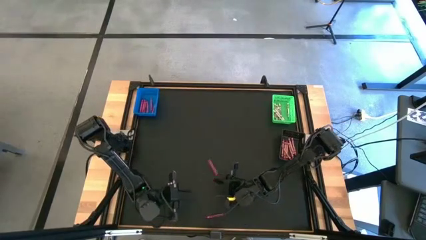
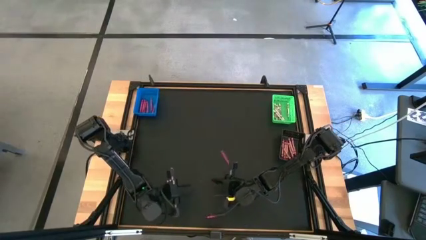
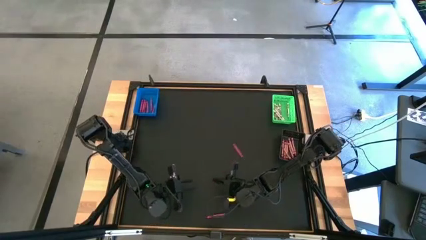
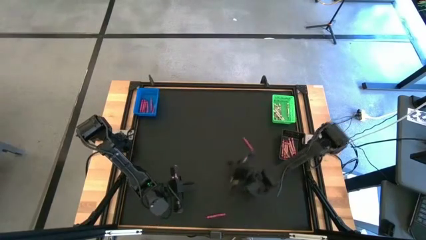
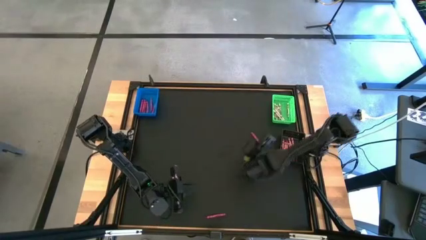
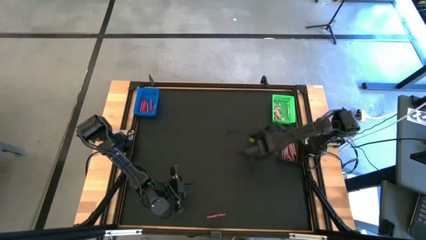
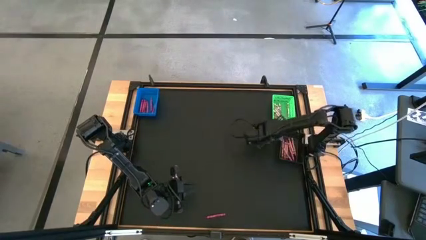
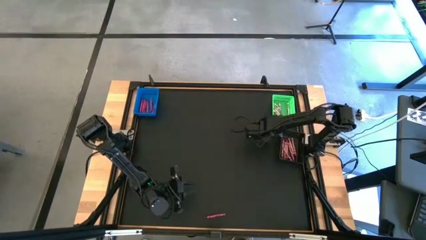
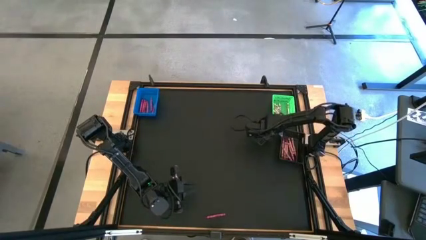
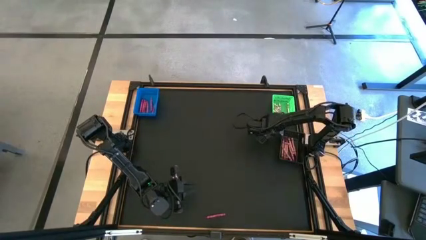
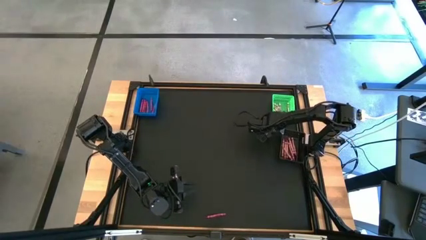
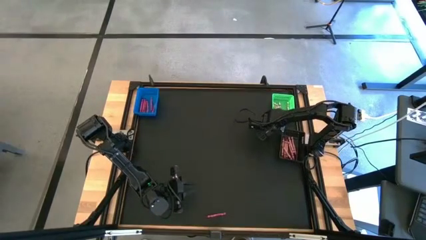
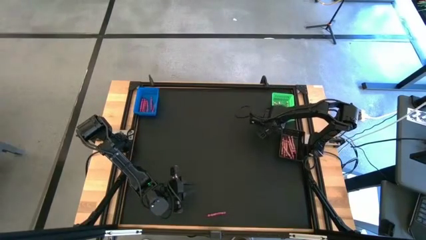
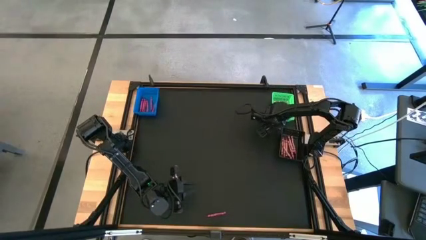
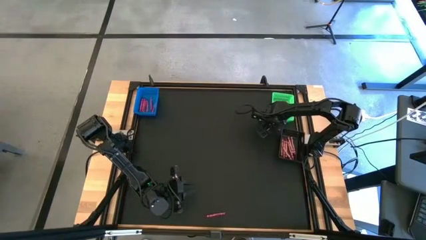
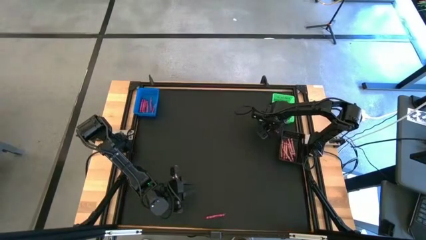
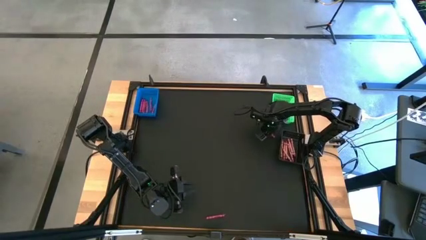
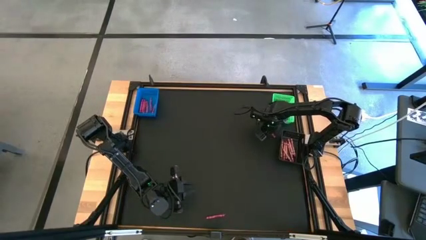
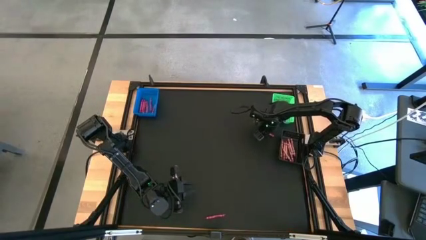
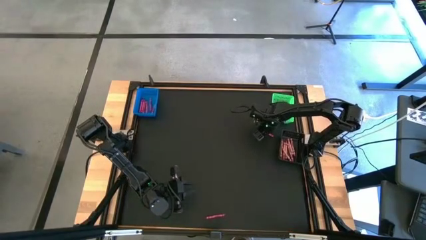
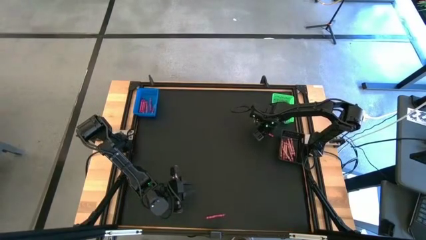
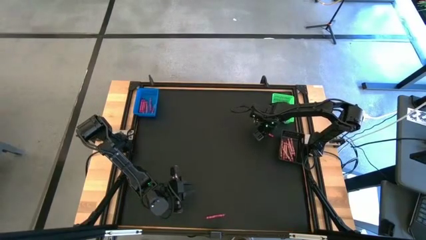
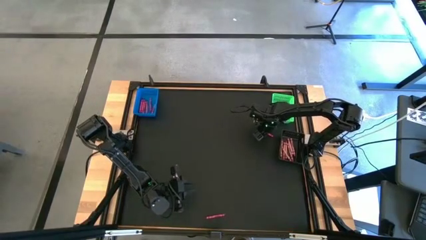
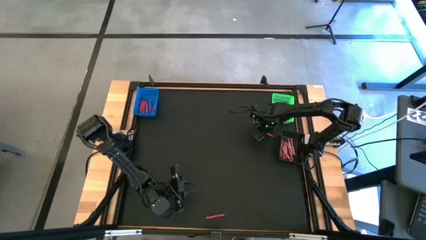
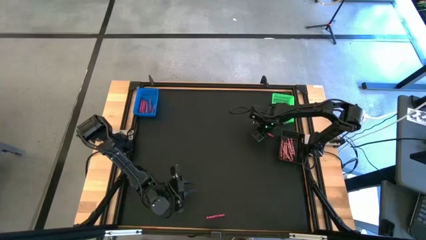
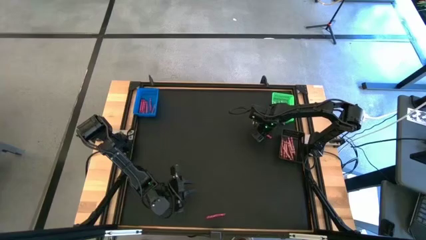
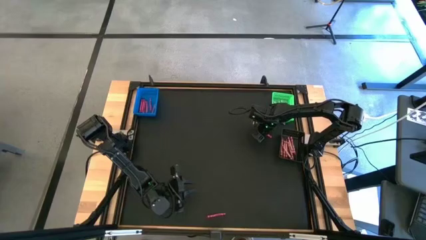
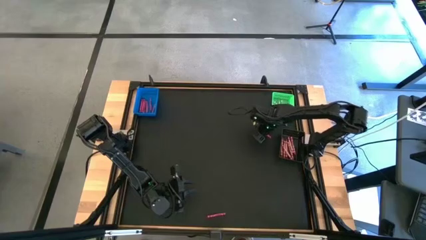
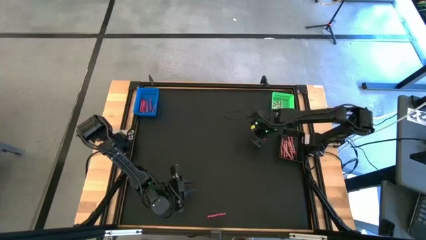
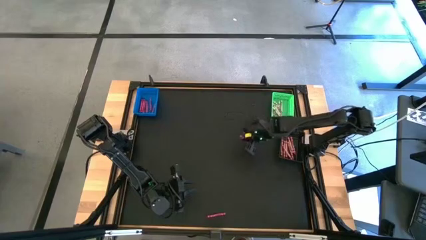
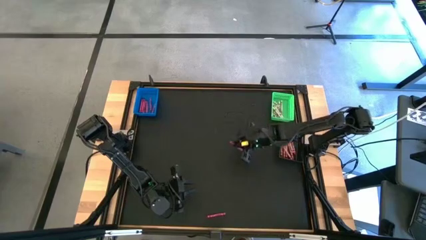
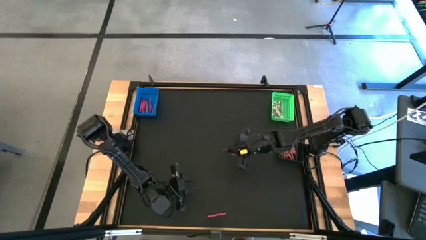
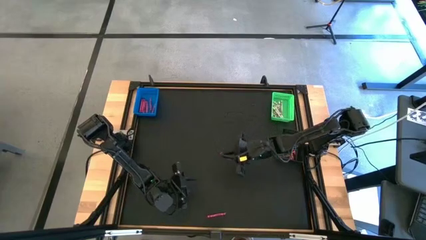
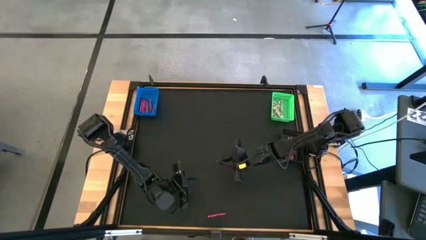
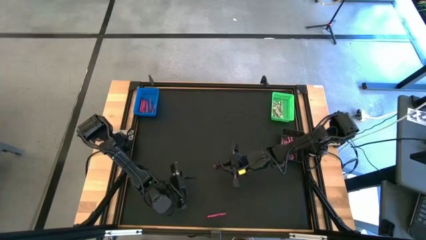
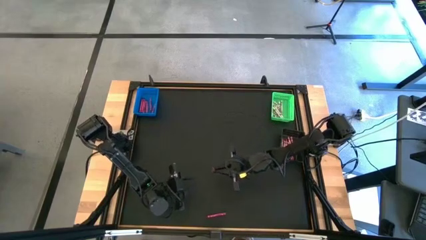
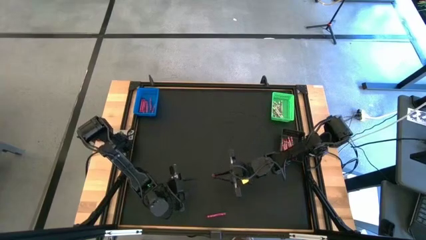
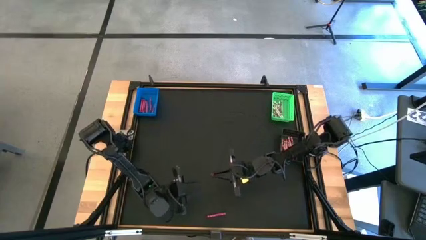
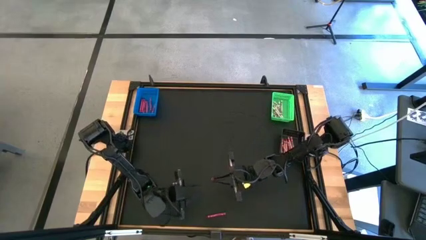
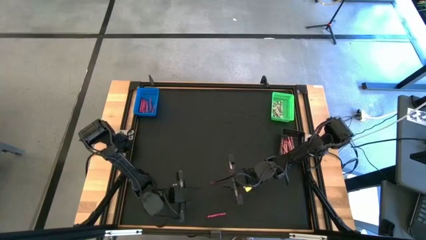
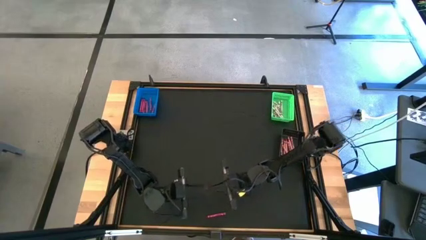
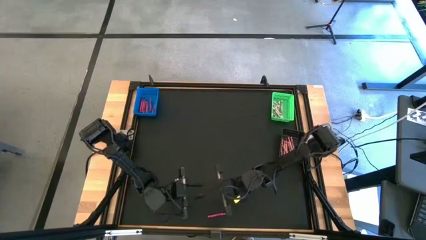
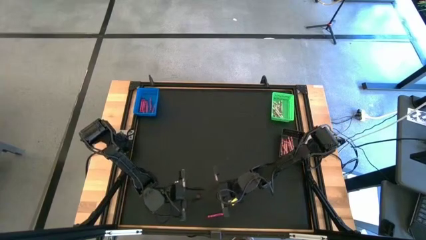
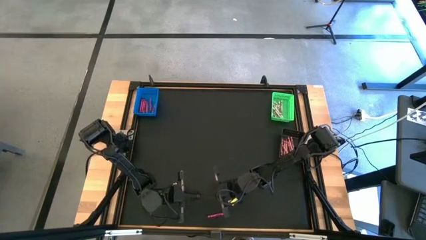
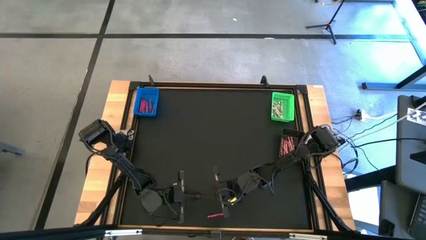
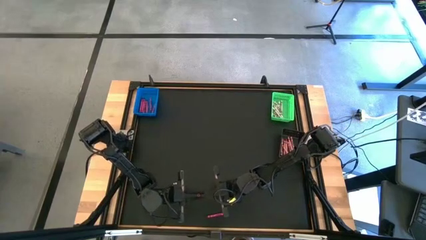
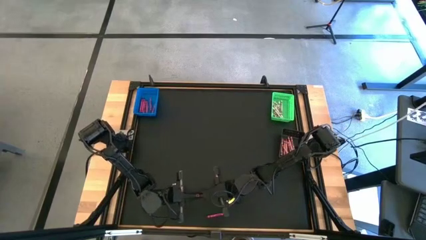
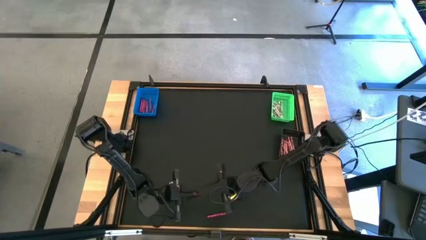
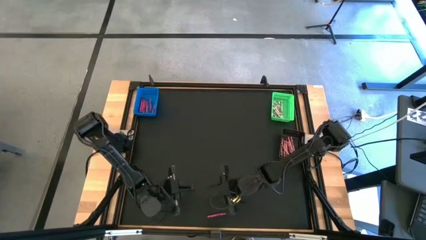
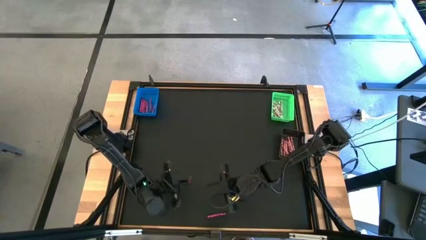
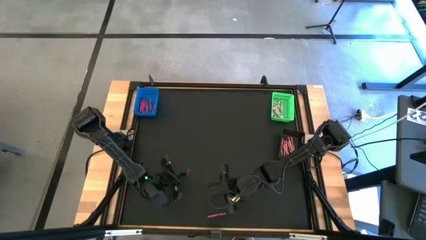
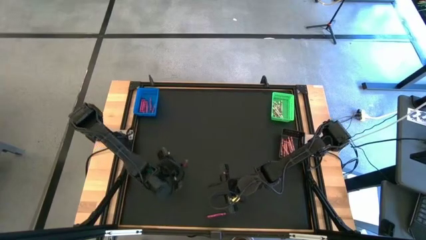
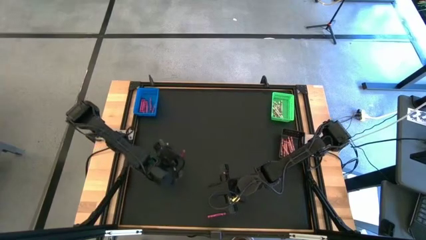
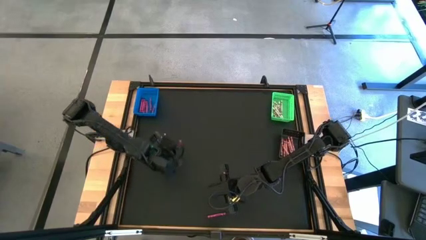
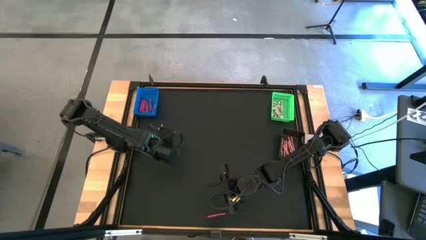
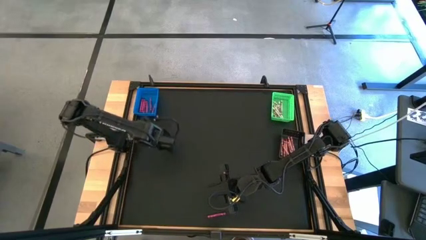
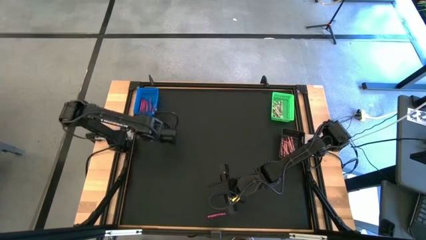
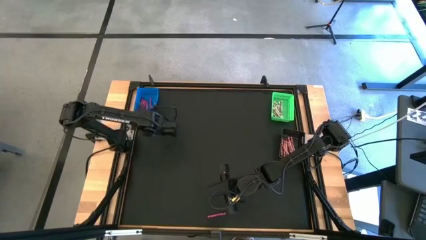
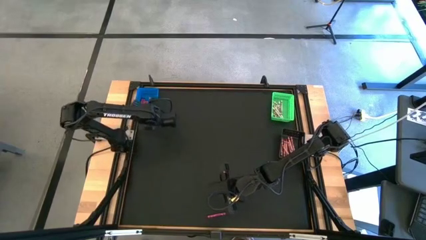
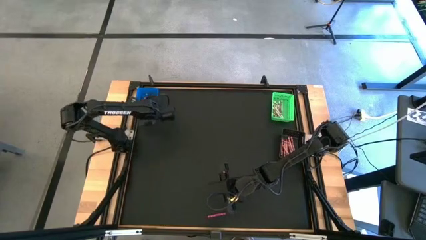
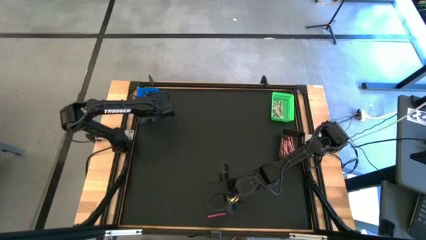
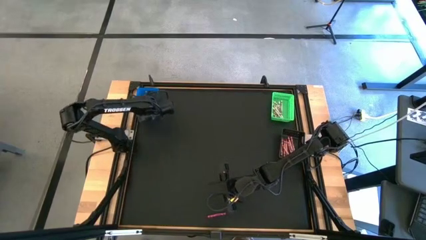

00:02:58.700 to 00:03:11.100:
Task: Sort crayons
Put the red crayon into the blue bin

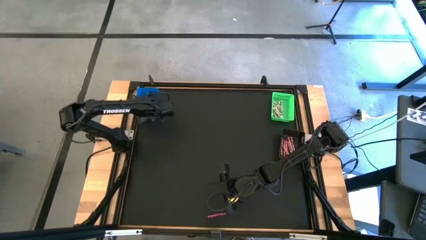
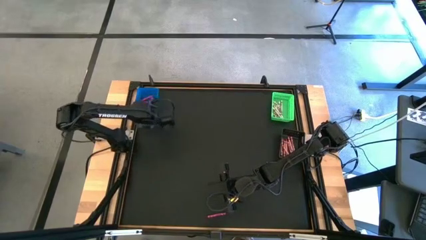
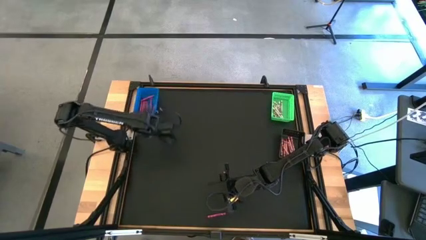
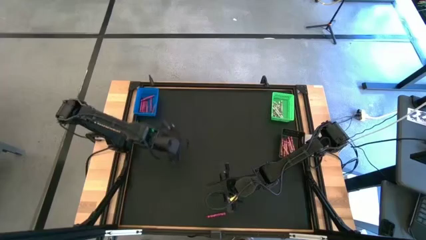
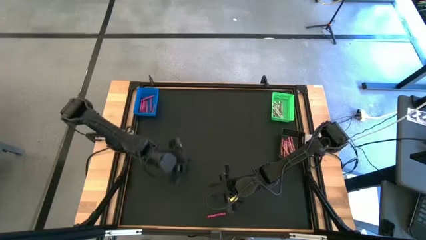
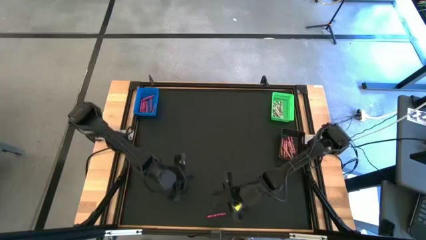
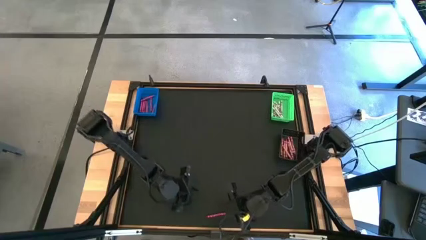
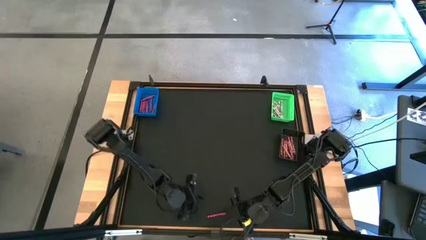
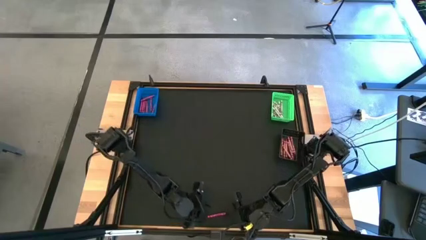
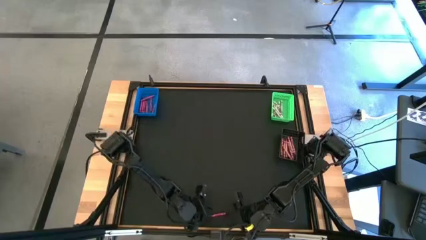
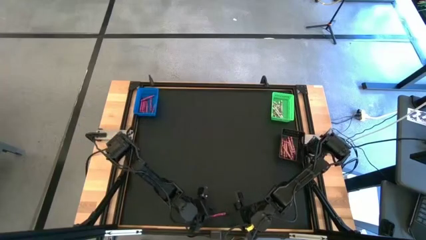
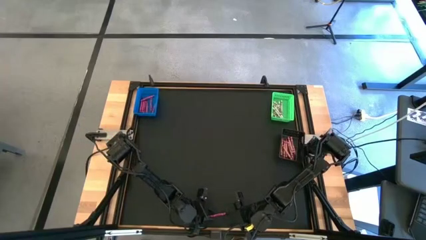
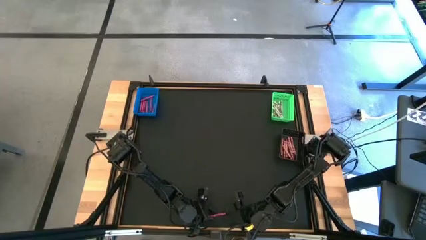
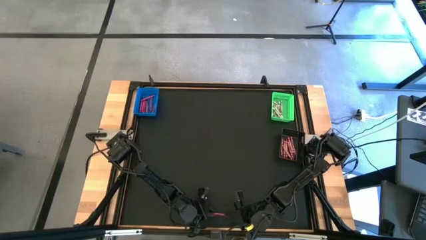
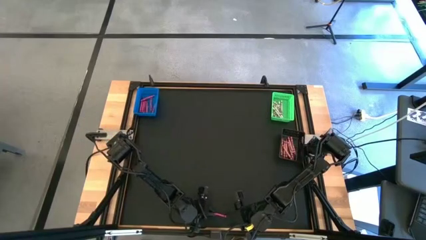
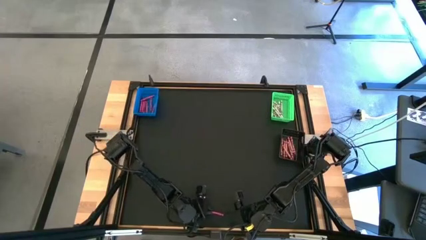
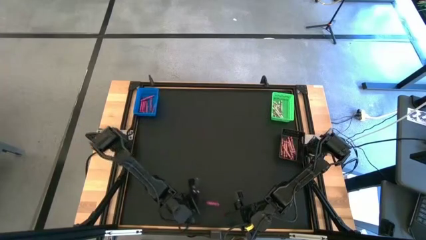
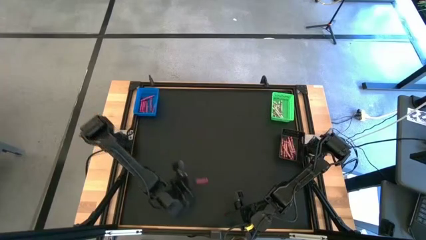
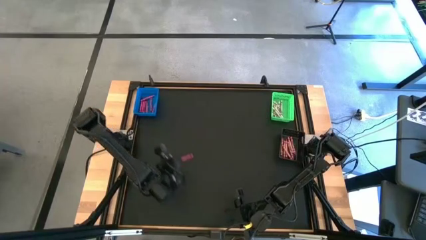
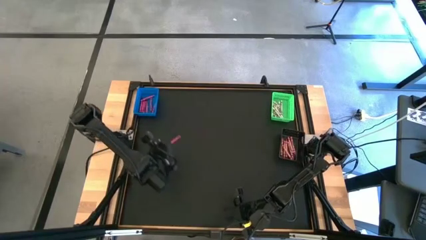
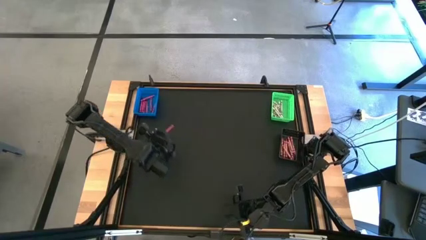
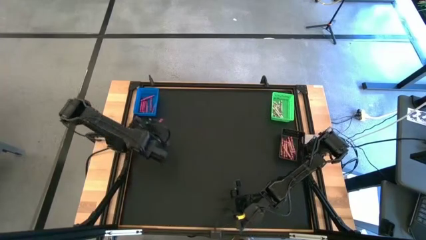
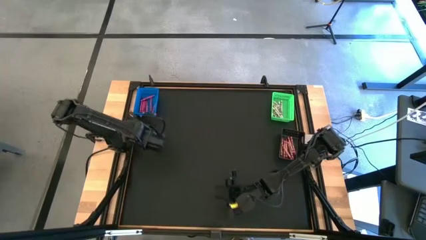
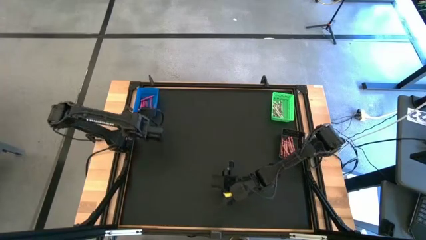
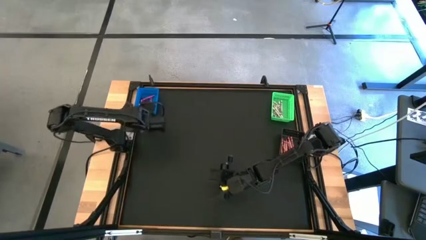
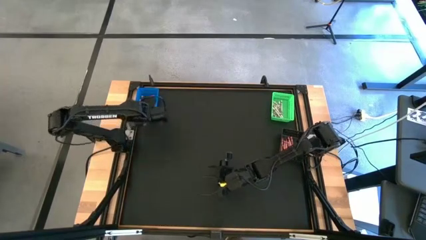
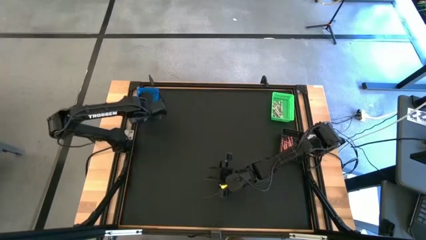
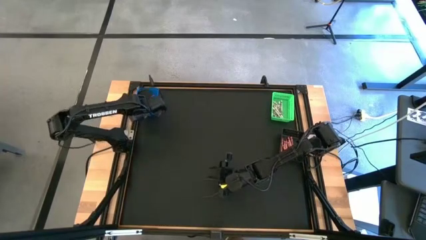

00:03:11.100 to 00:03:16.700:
Put the red crayon into the blue bin

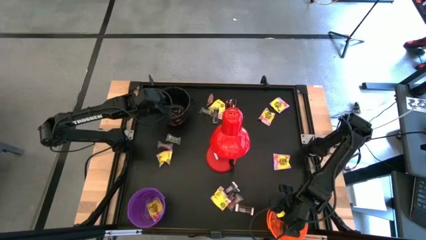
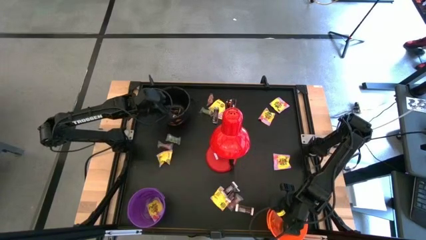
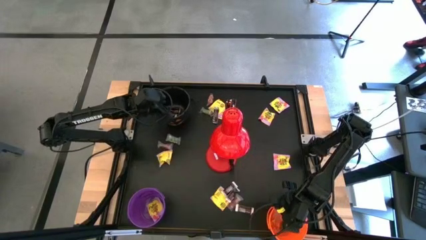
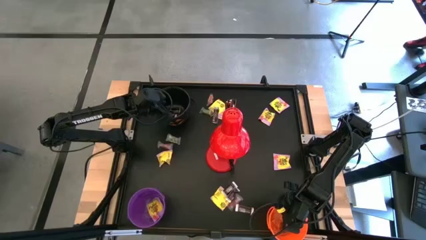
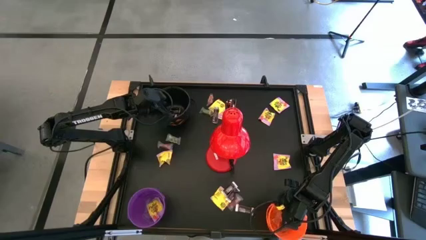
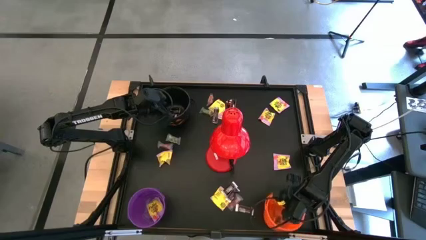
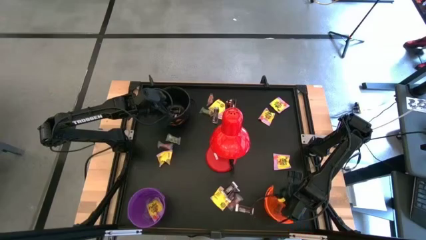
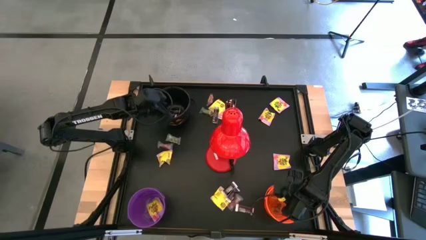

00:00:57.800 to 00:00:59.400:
Task: Organize candy in baskets
Adjust the orange bucket
